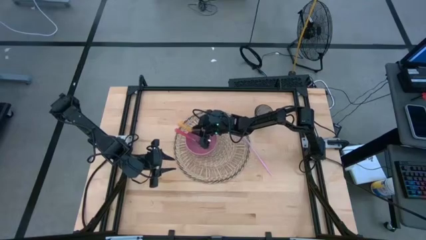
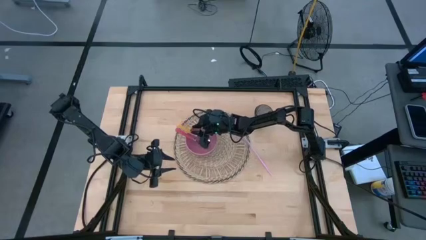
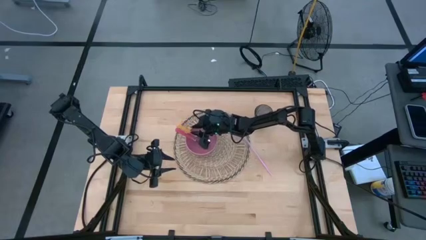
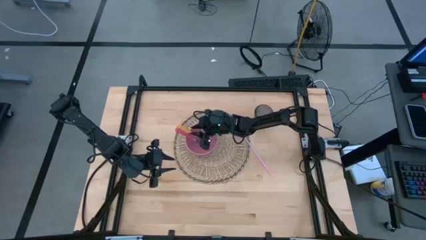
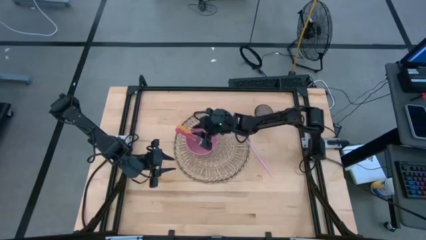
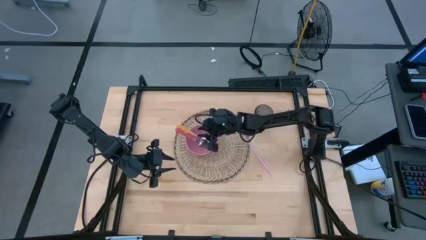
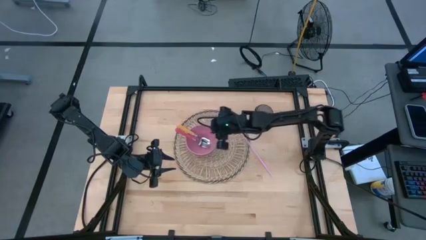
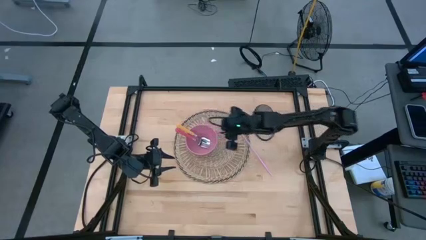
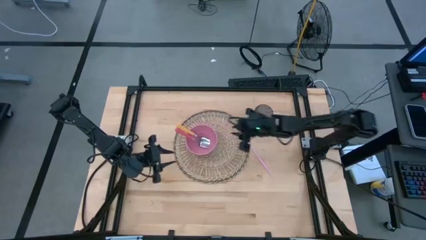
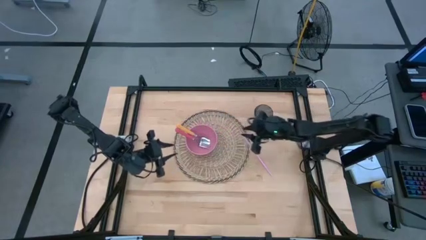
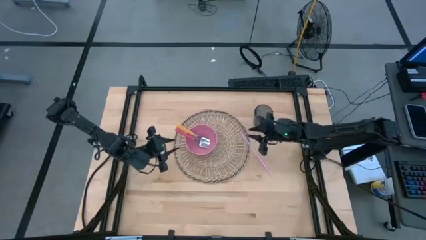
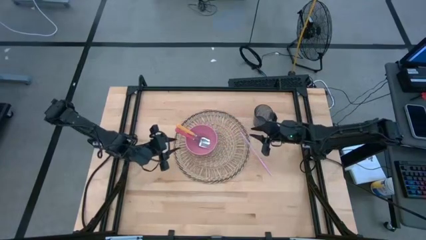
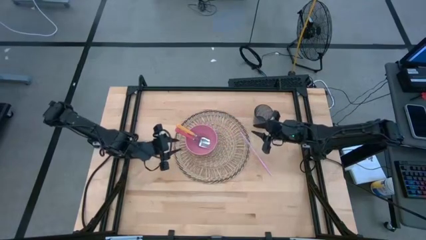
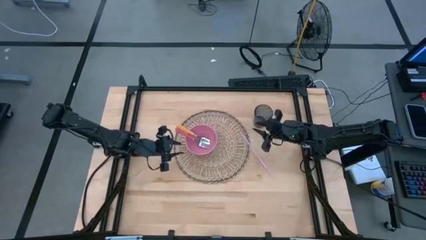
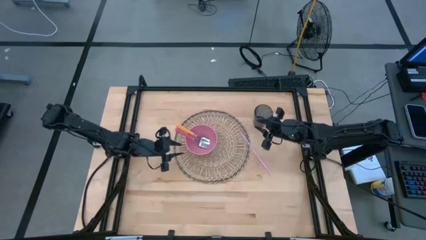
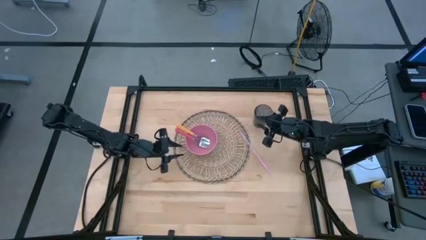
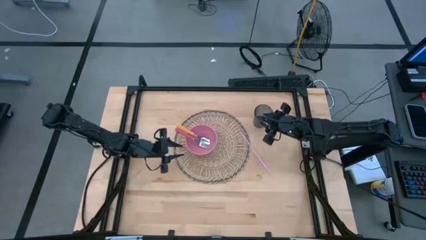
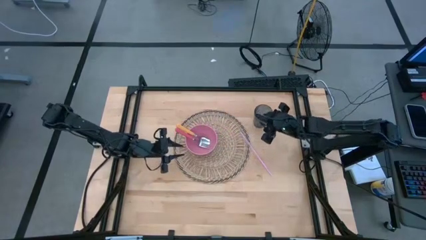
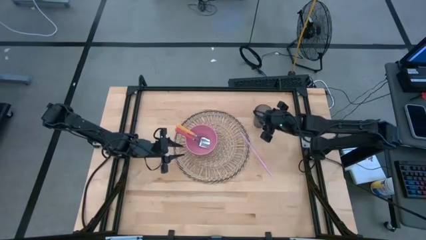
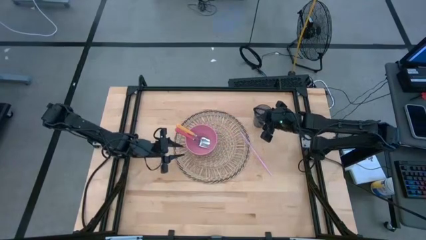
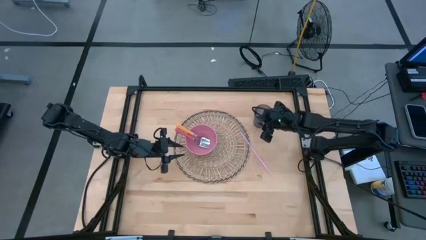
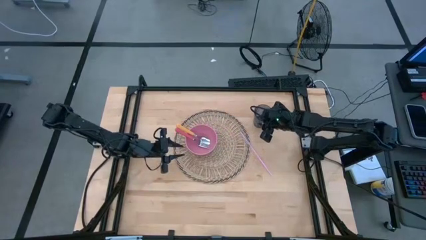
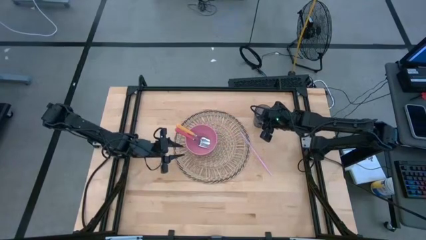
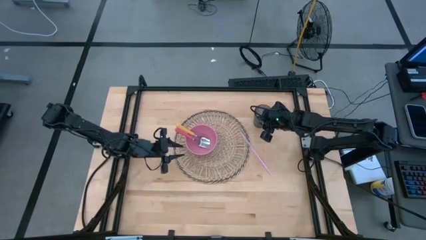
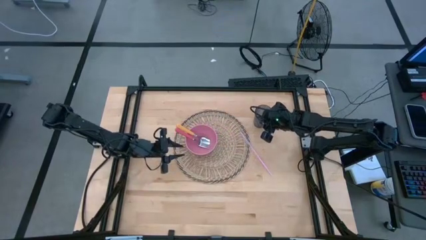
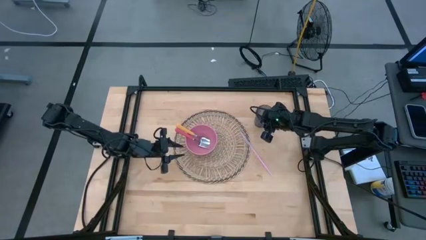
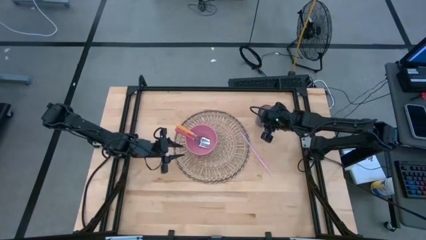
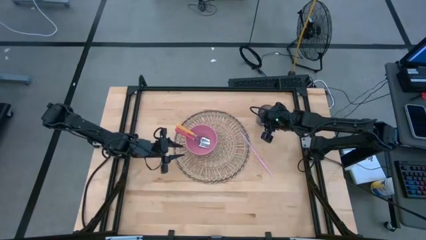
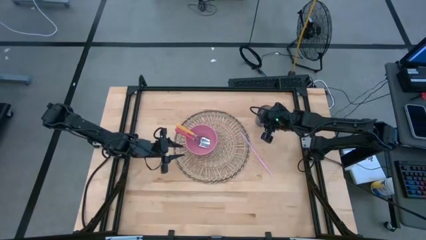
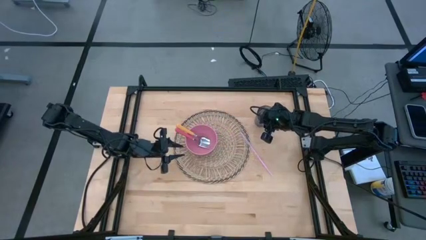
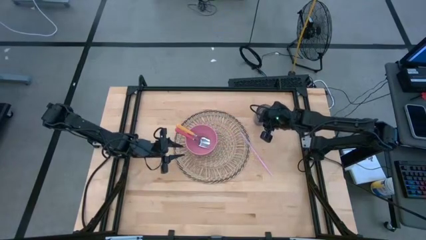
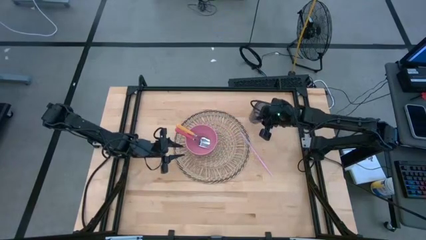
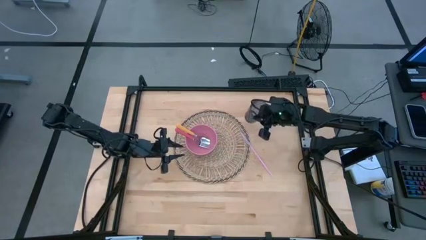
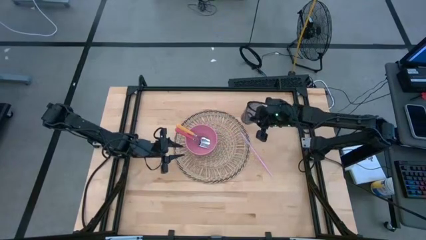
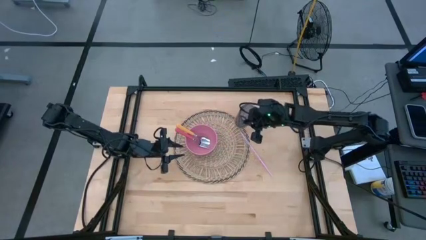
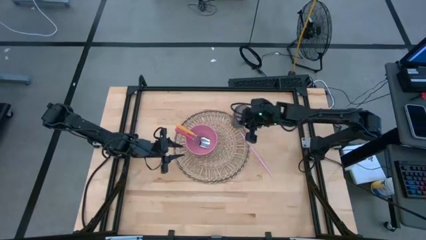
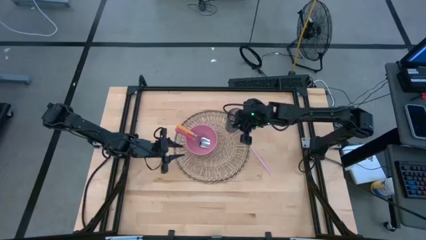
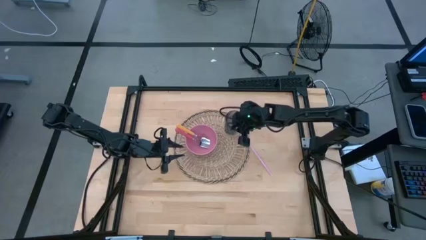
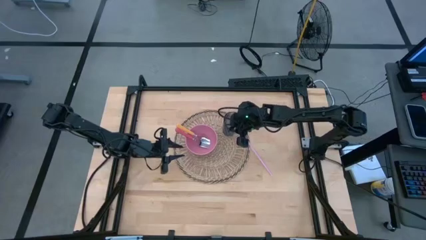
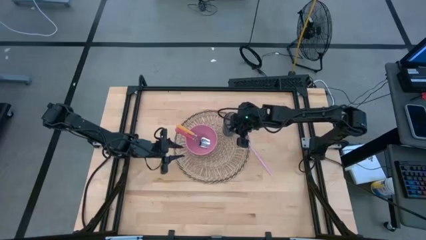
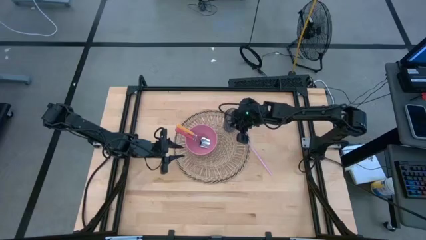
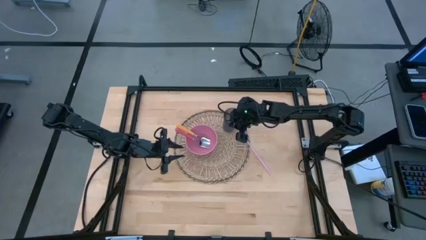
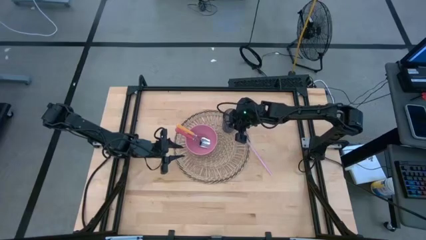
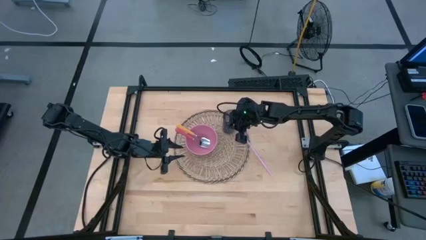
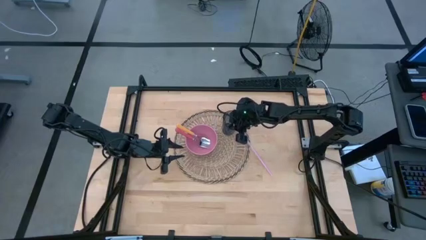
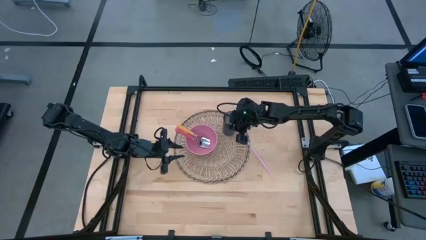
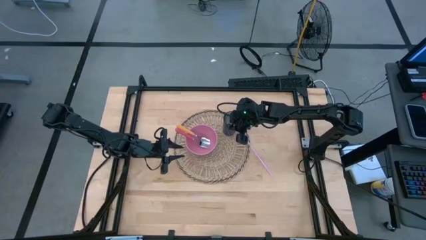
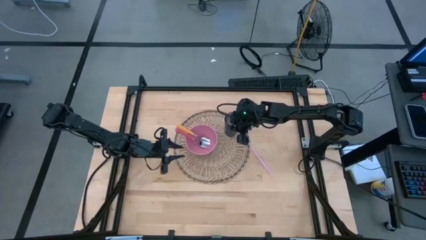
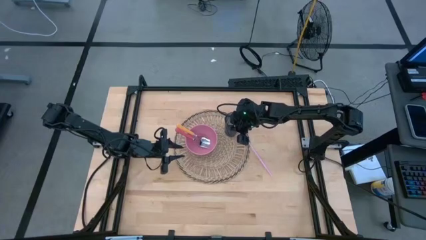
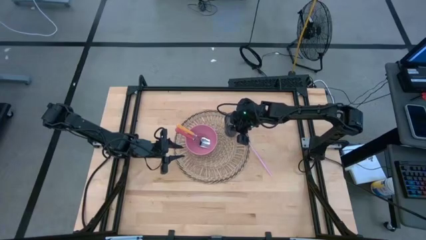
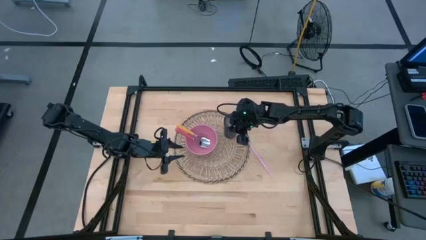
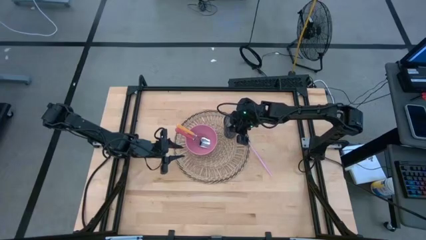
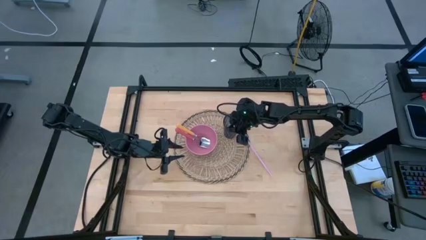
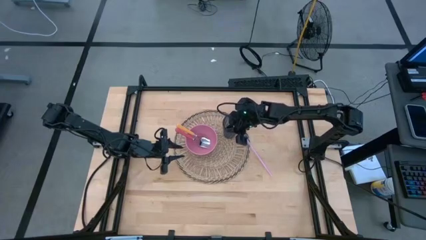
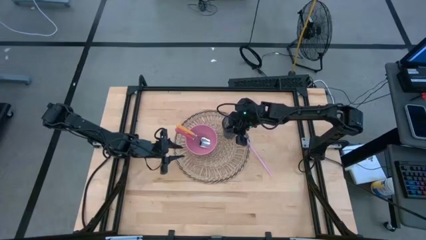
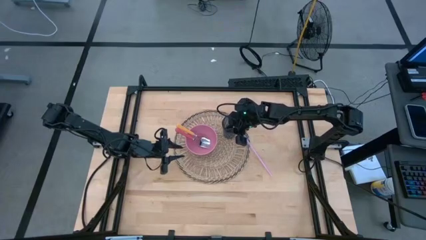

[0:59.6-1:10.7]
Task: Pick & Place Utensil
Put the blue cup on the brown mat to the top right of the pink bowl

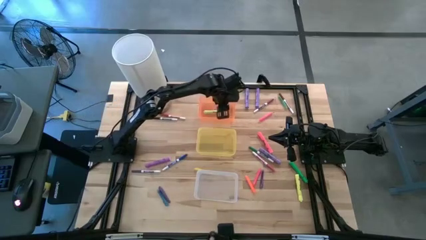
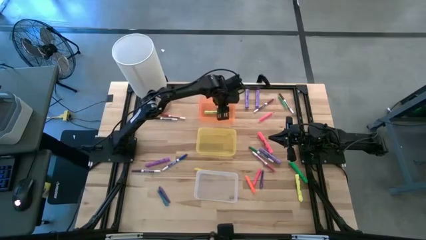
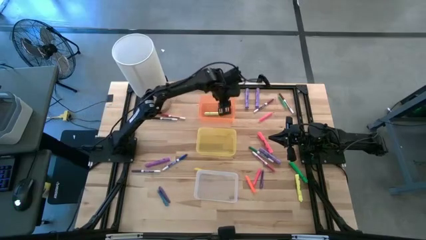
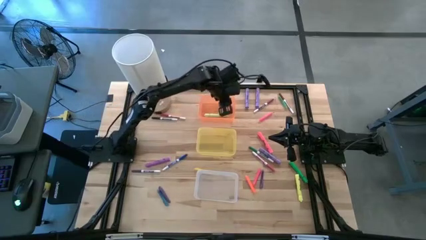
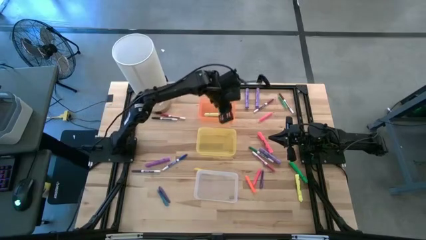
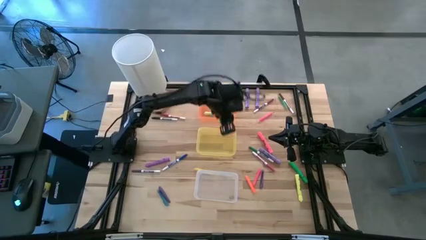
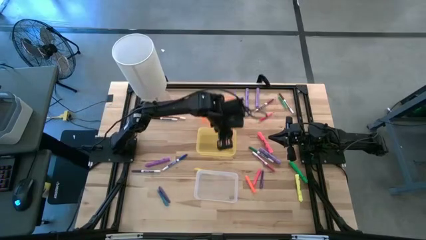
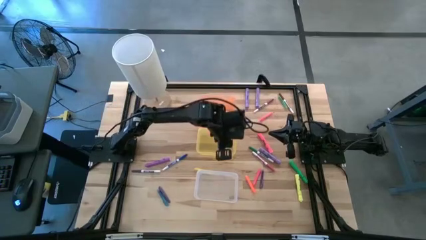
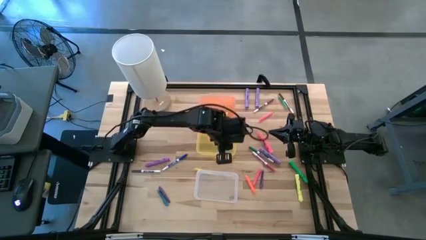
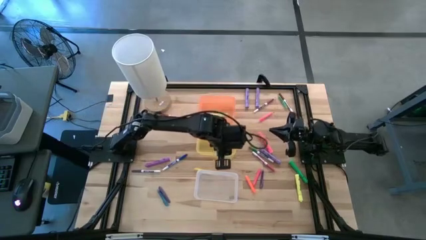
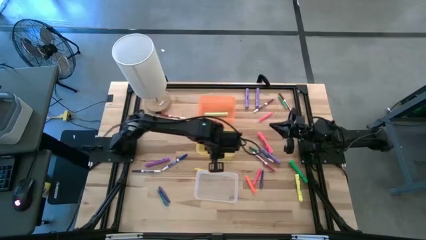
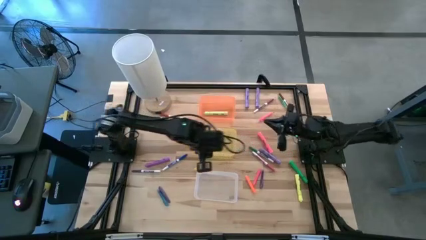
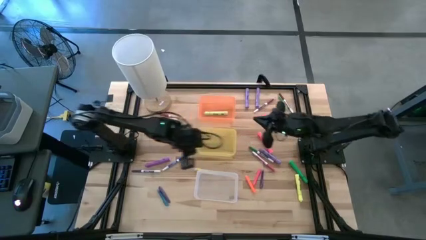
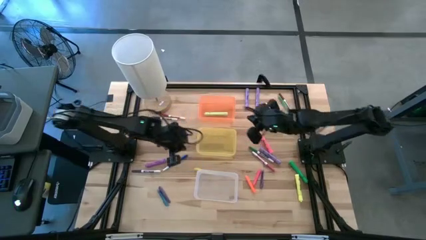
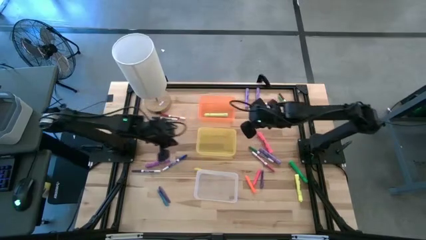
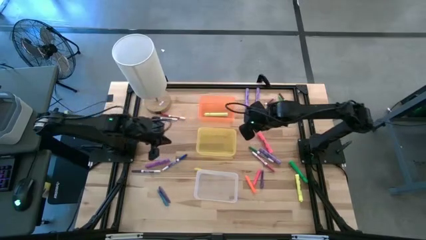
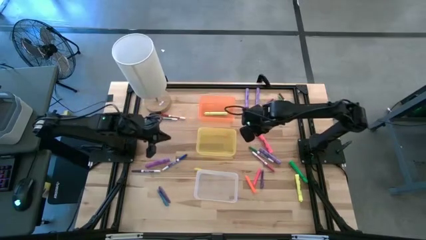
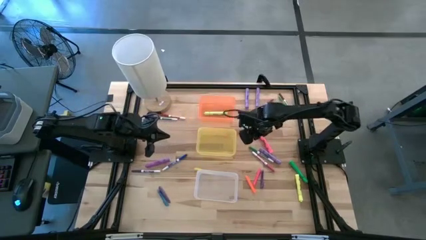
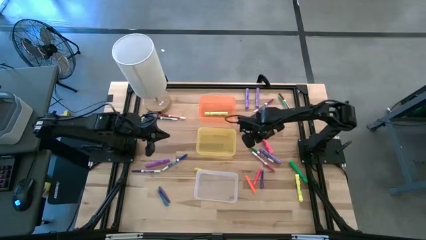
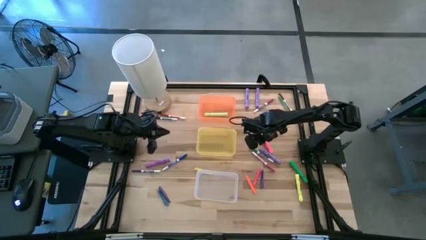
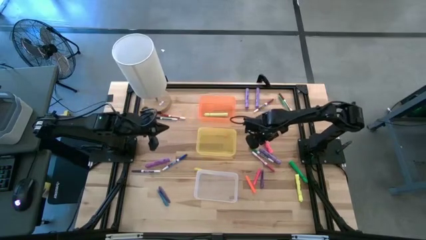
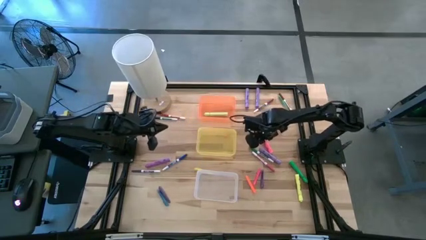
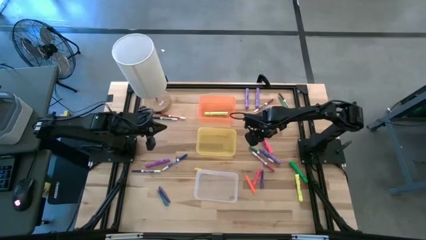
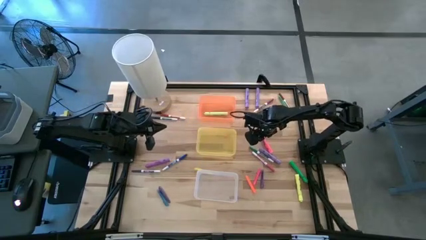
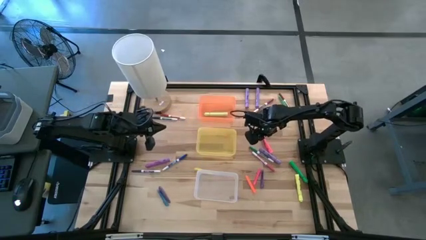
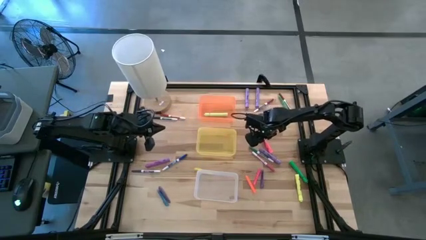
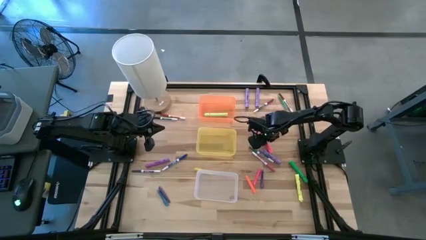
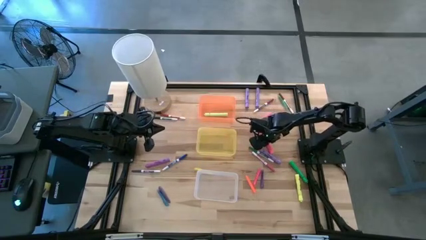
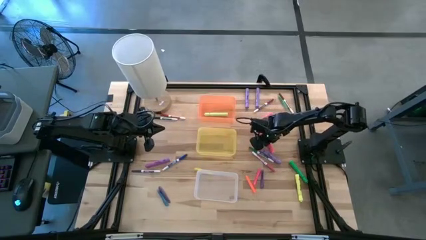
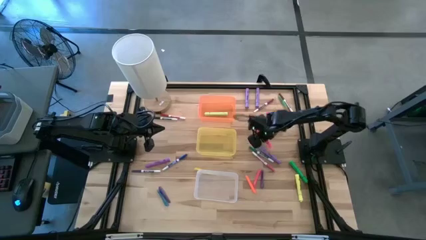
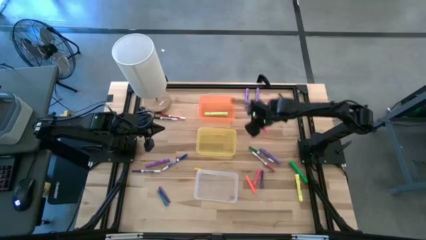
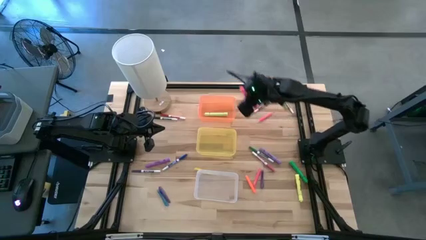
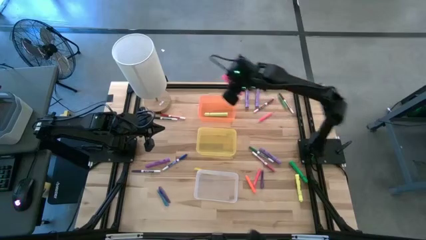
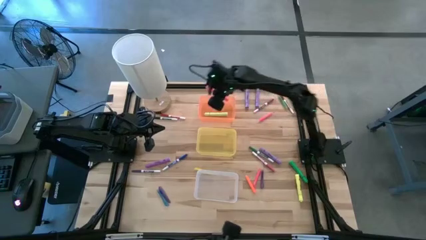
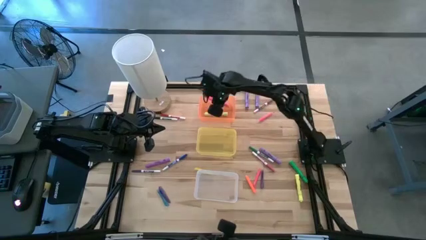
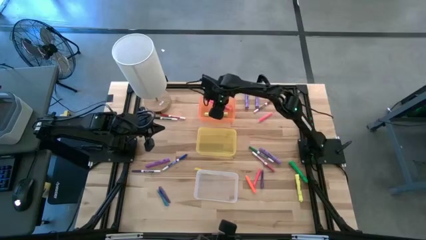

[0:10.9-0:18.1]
Task: Pick & Place Markers
Put the pink highlighter pen into the orange bin
